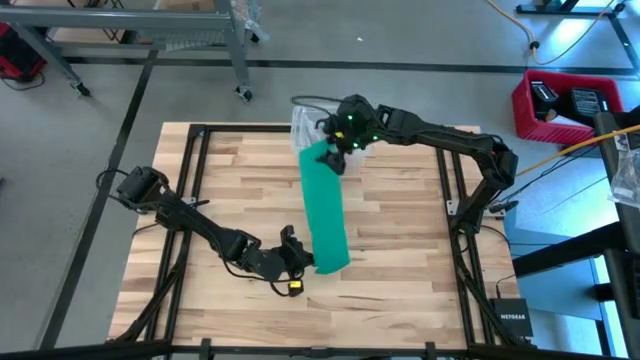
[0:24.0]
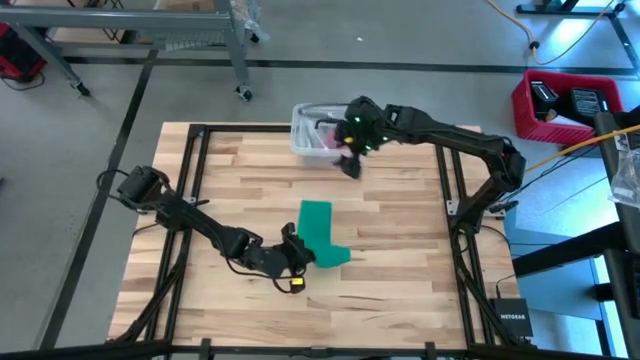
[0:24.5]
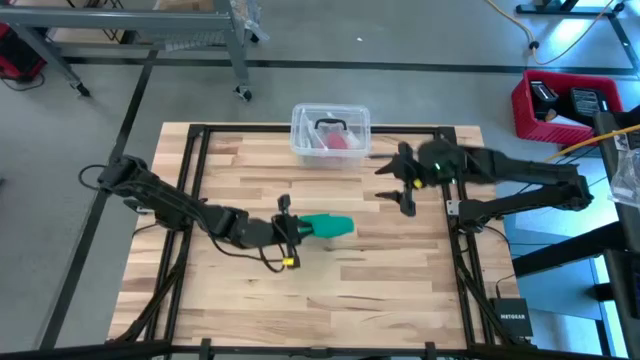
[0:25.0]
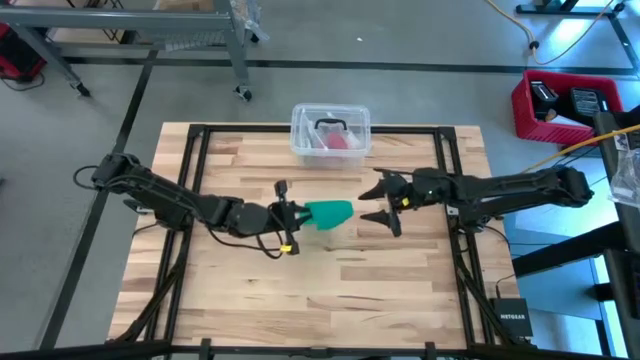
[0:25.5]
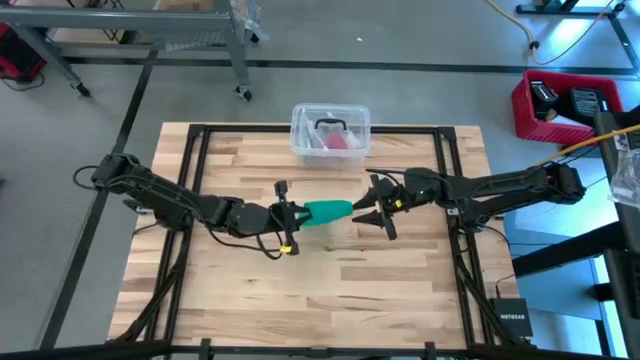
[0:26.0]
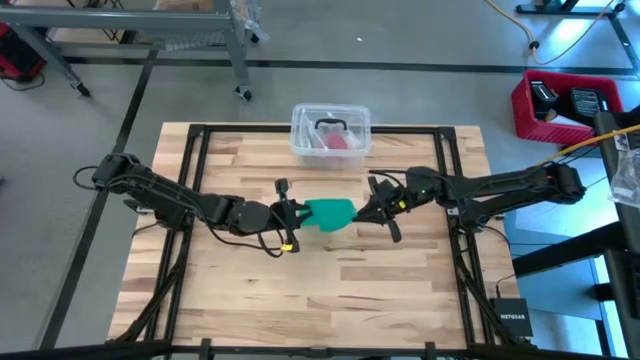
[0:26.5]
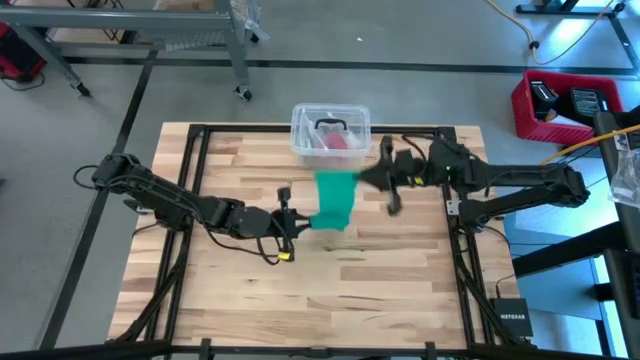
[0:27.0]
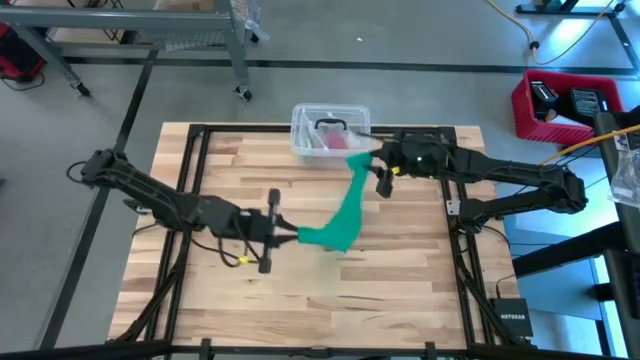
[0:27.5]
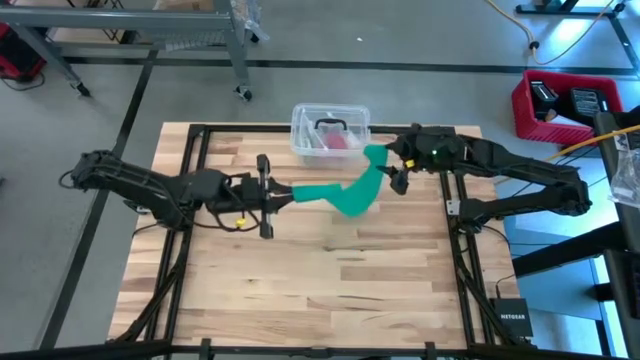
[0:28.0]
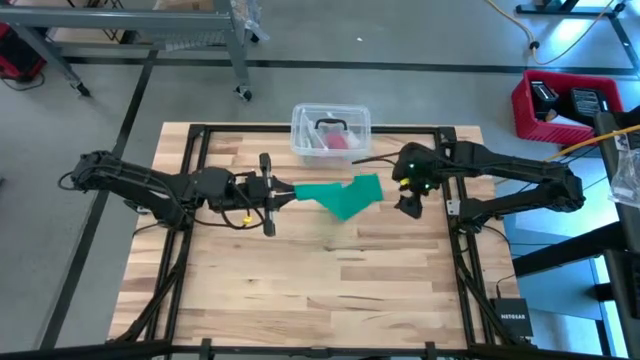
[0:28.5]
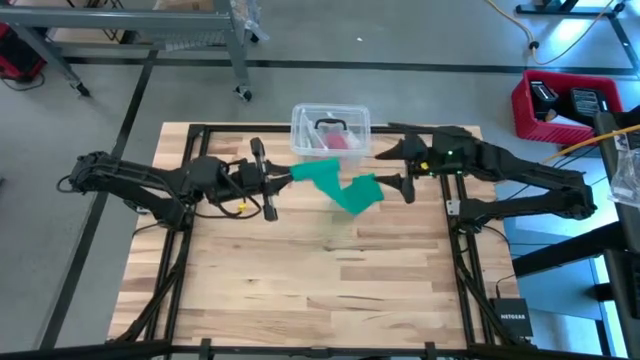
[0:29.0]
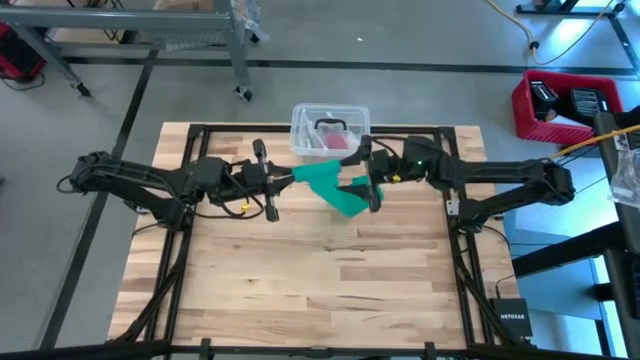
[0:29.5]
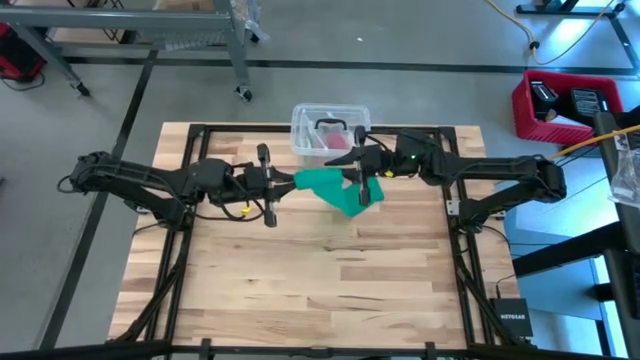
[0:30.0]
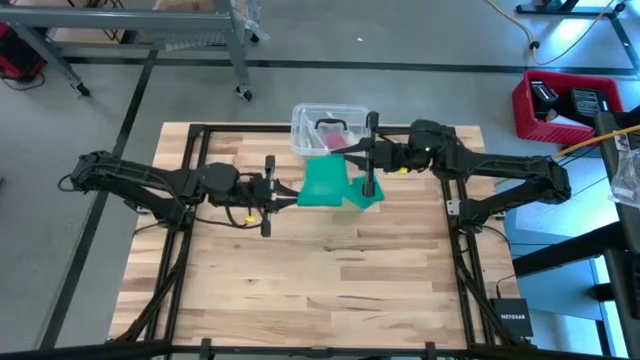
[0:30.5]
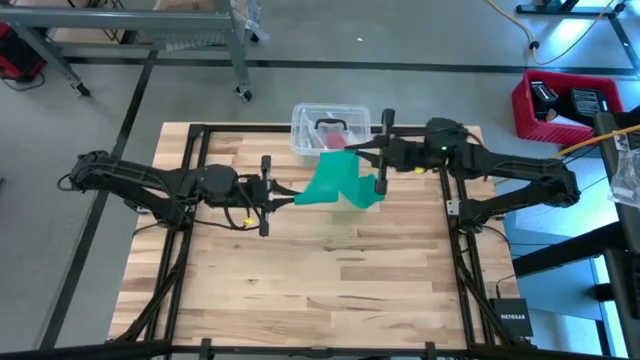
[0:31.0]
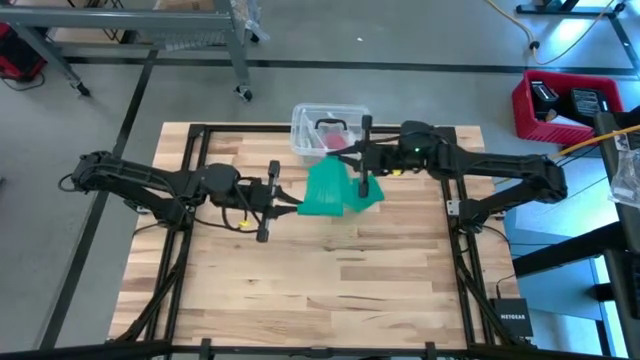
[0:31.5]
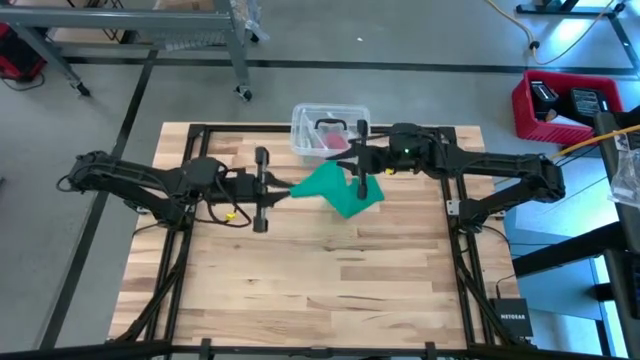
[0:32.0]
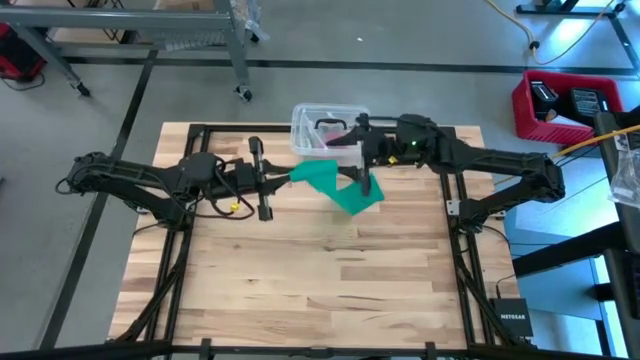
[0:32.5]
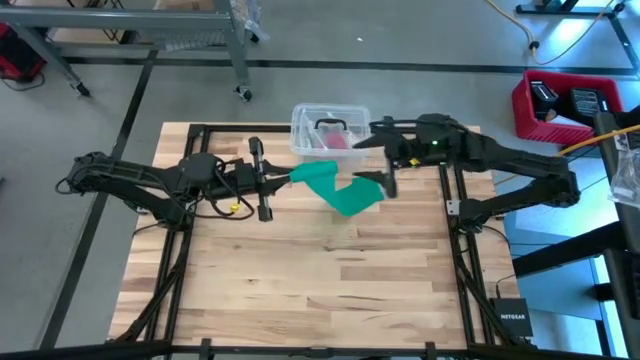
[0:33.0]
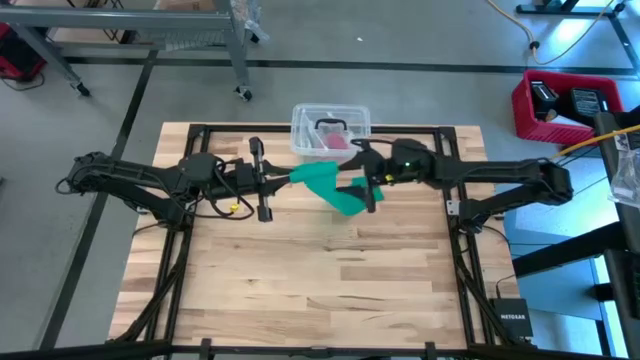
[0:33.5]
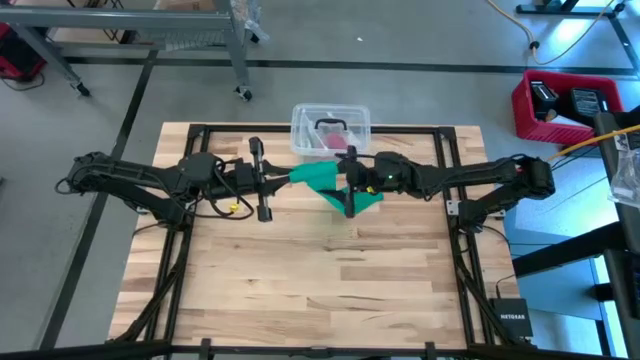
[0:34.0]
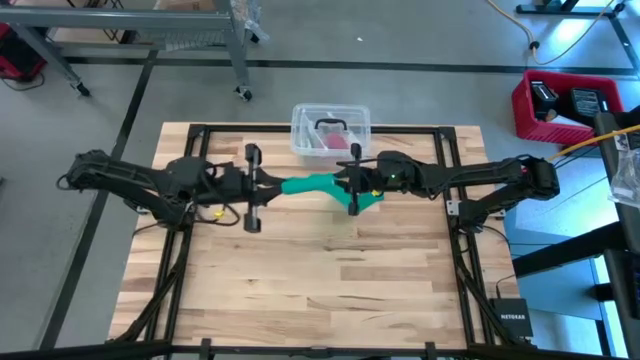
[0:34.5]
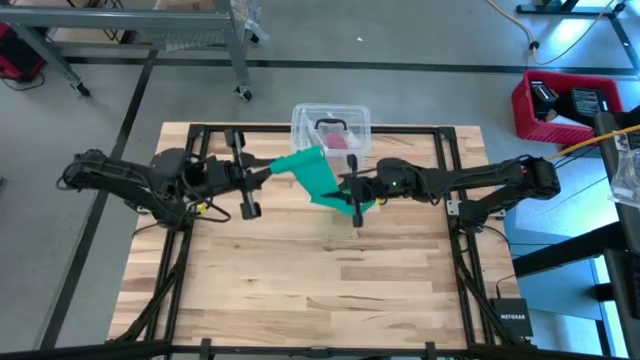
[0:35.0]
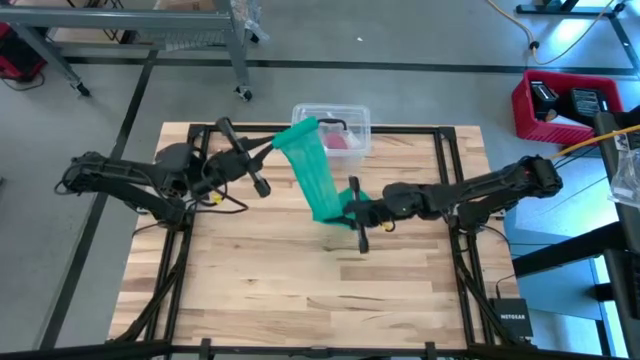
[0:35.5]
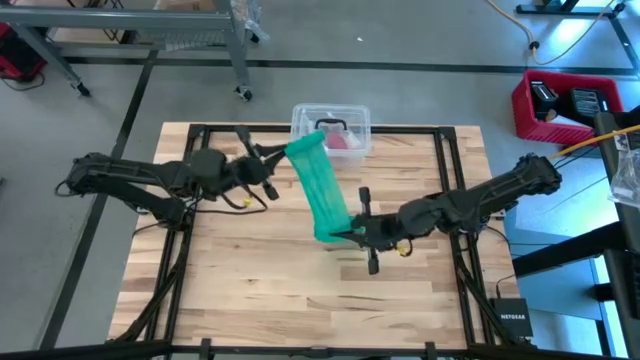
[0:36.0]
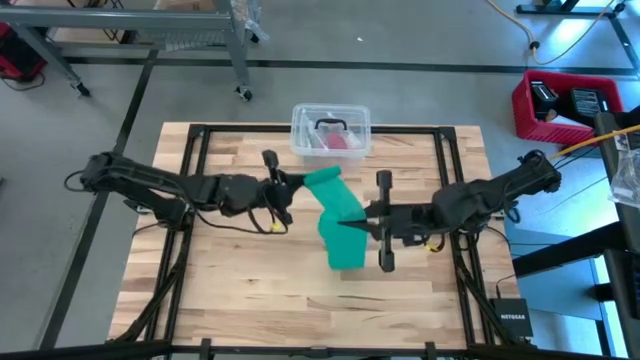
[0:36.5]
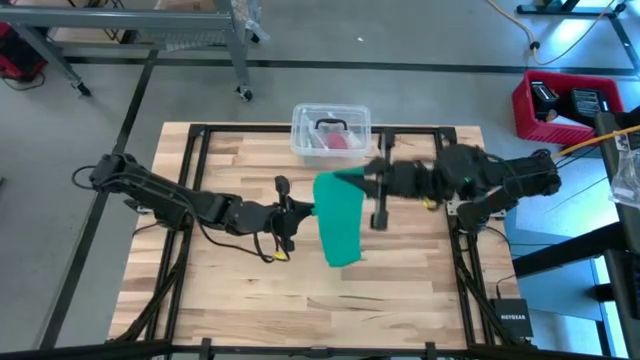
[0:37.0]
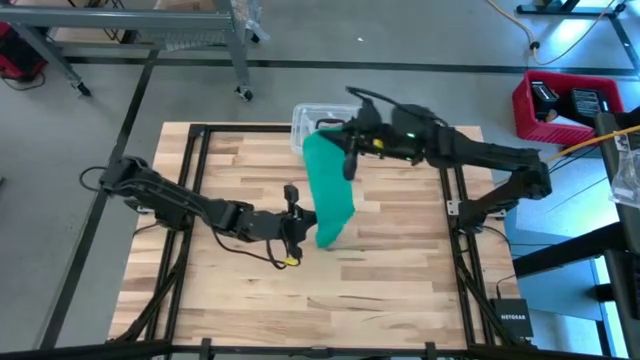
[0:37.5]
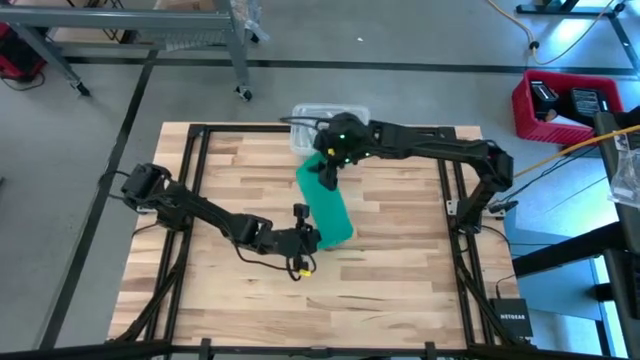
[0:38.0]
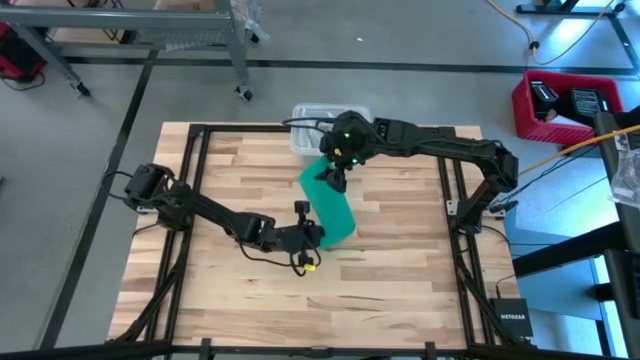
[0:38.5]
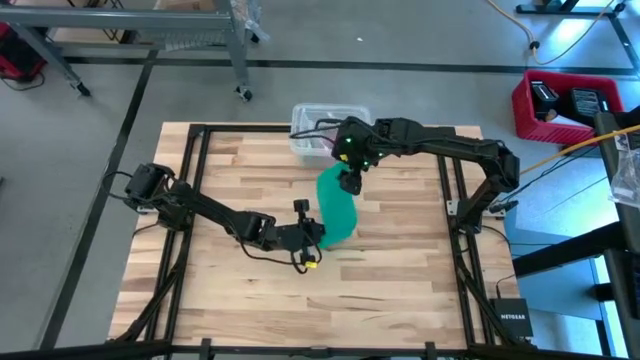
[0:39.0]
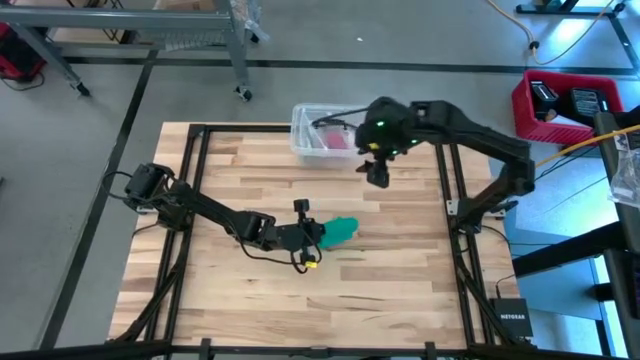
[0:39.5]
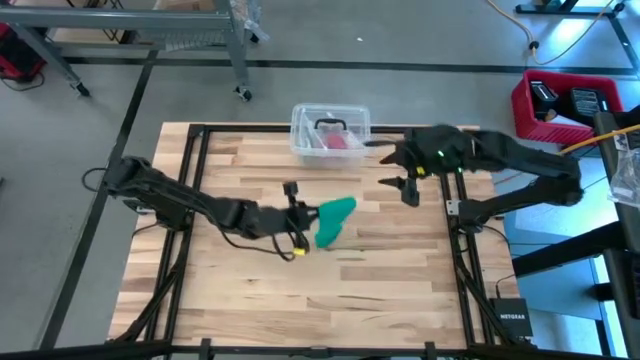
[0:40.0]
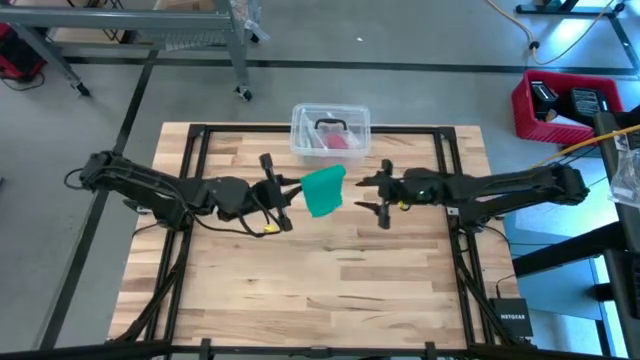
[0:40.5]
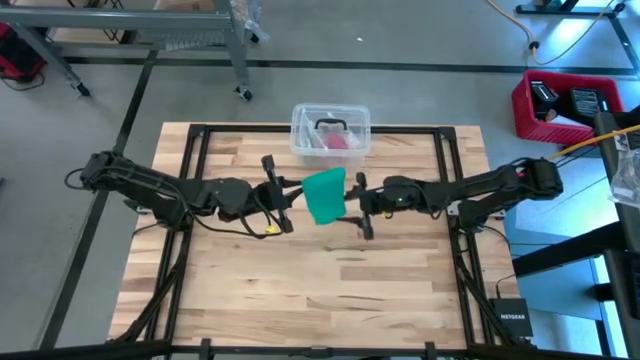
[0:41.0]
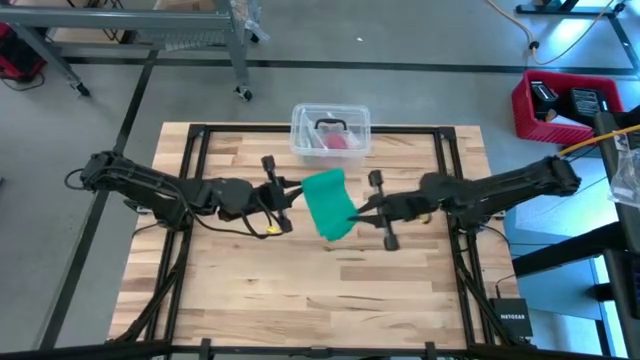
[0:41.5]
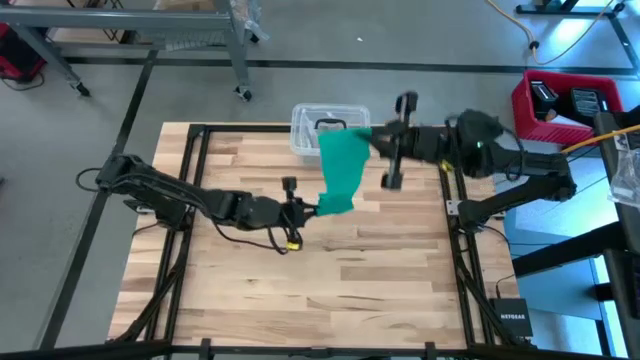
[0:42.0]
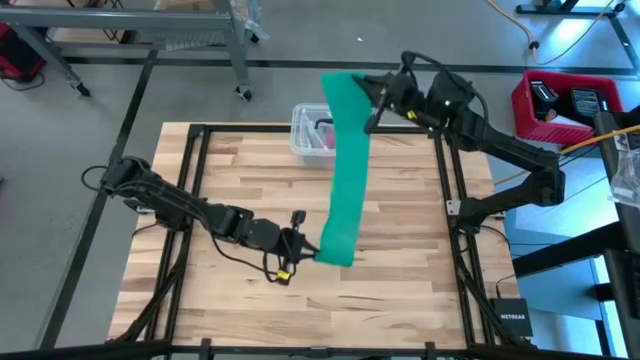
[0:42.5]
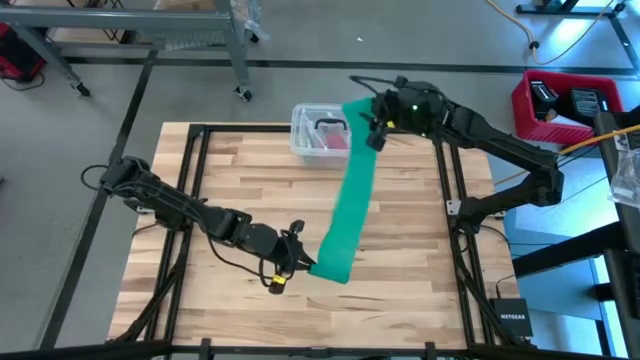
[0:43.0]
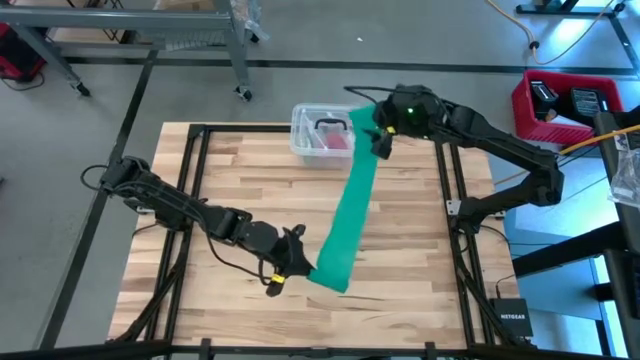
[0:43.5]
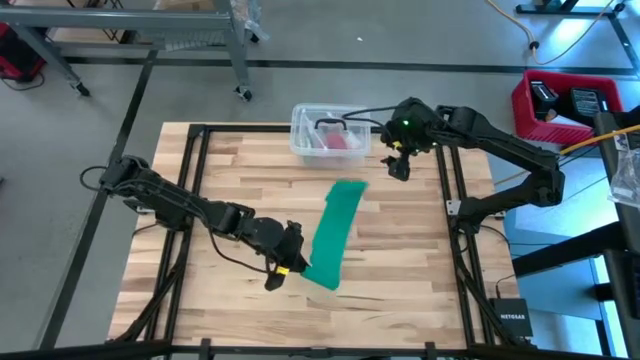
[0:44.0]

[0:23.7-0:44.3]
Task: Roll bandage
Roll the green bandage

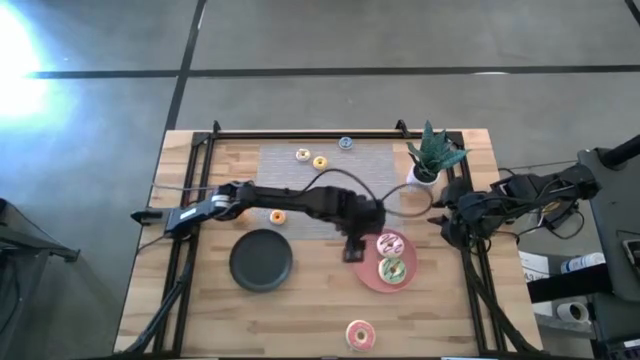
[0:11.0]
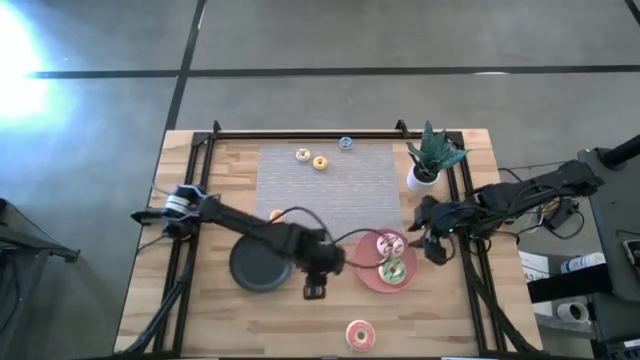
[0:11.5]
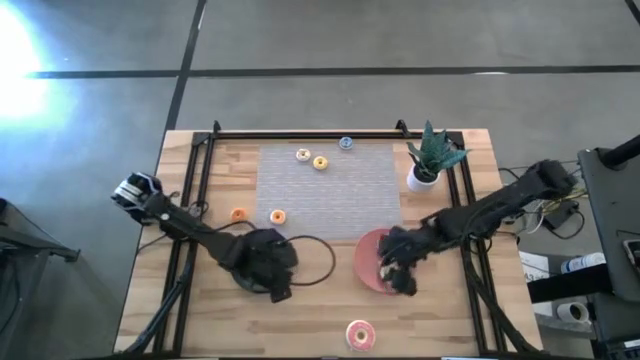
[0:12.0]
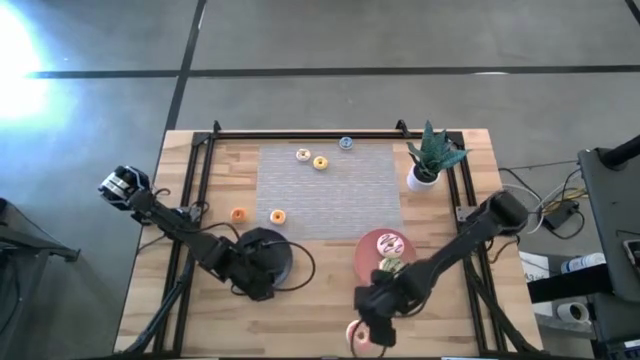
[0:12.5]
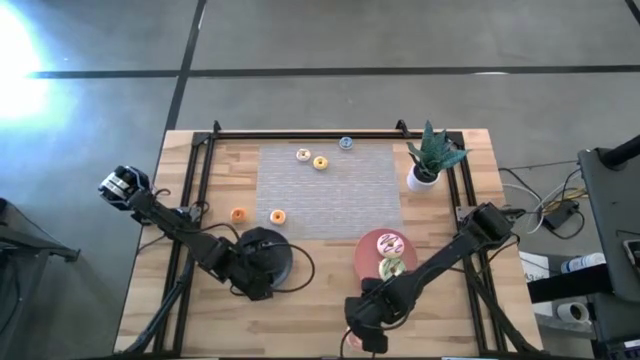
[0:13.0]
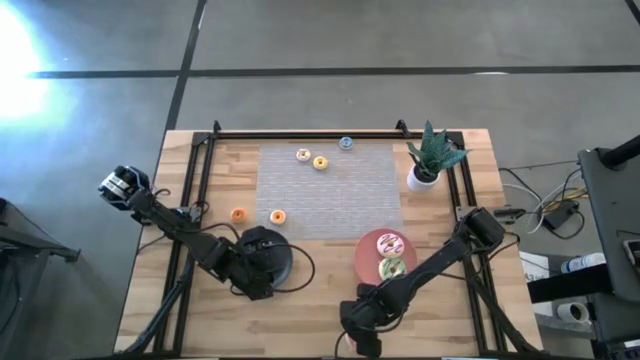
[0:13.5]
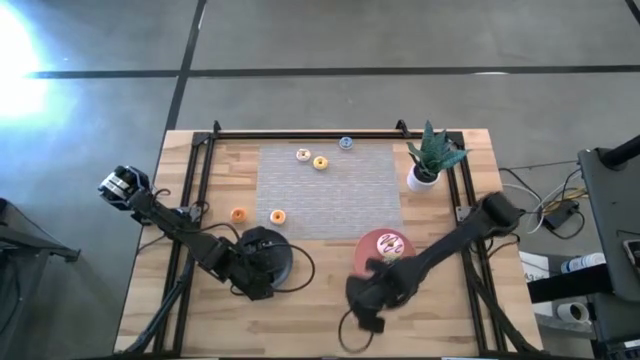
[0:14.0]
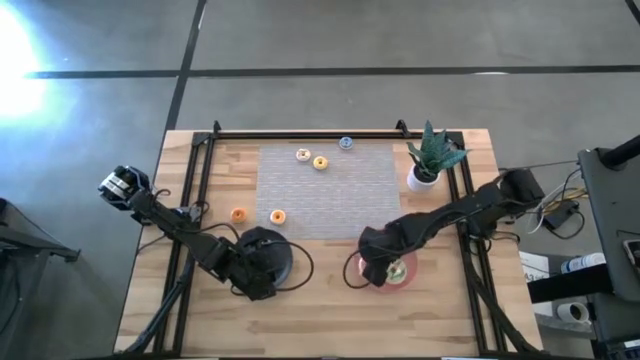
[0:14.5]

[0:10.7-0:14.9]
Task: Pick & Place donuts
Put the large pink donut on the pink plate
